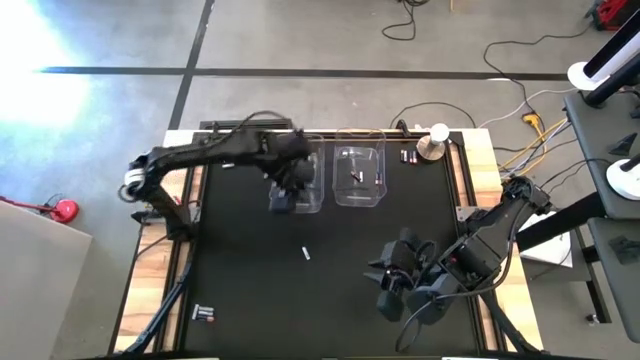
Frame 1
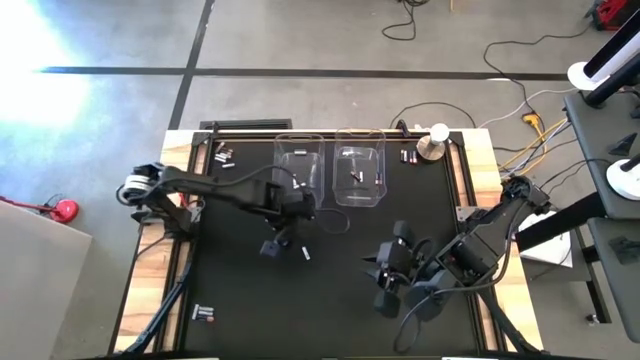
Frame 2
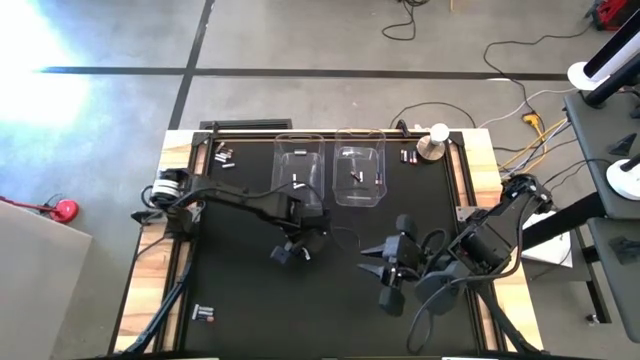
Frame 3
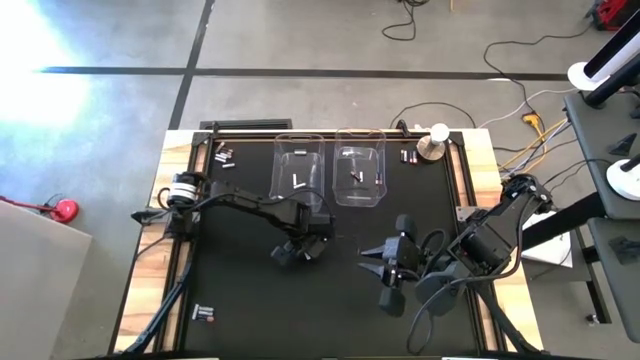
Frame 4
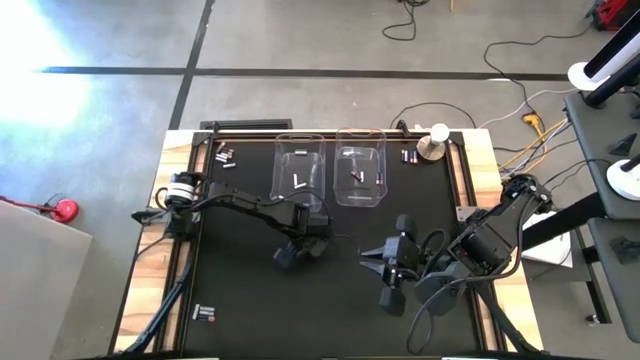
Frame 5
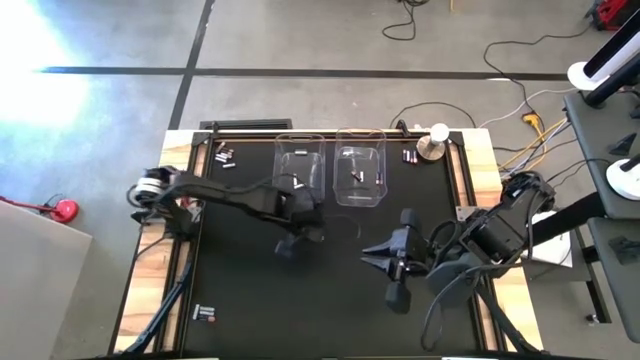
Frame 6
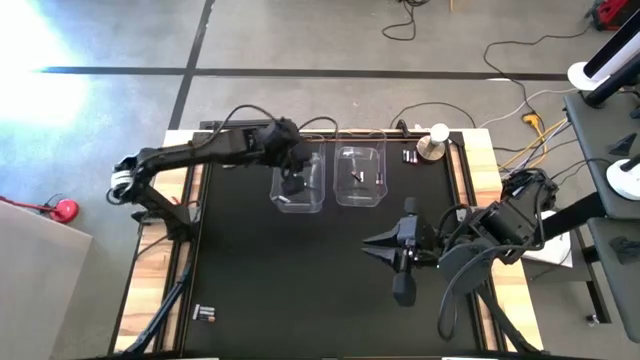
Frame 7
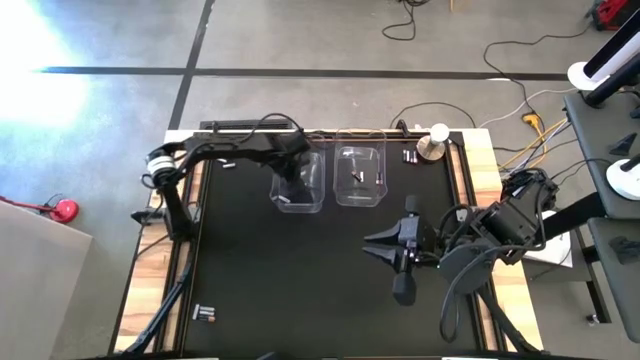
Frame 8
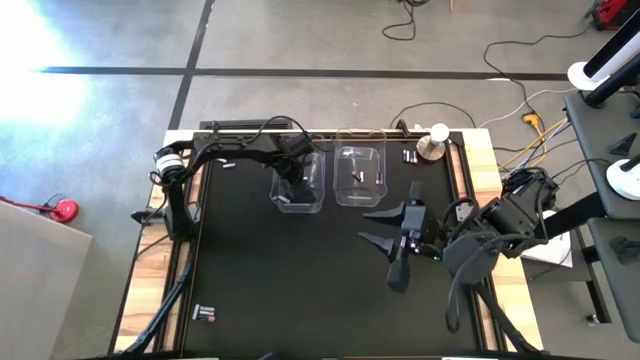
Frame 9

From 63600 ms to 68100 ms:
Task: Sort batteries
Put the white battery into the left transparent bin

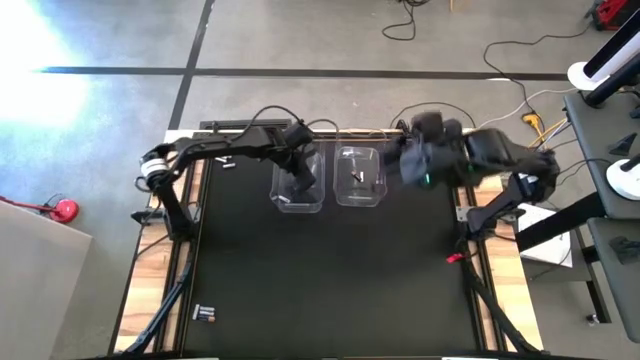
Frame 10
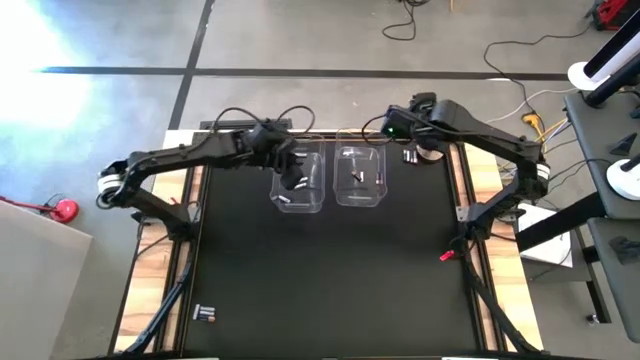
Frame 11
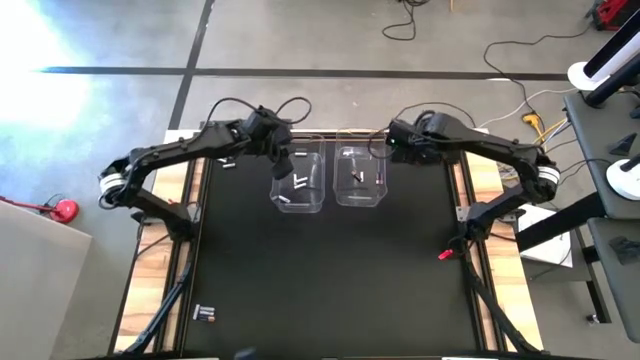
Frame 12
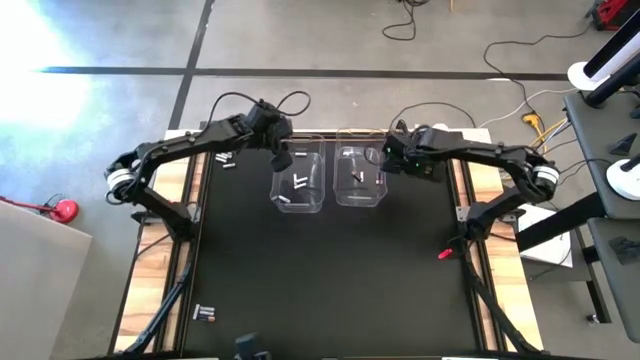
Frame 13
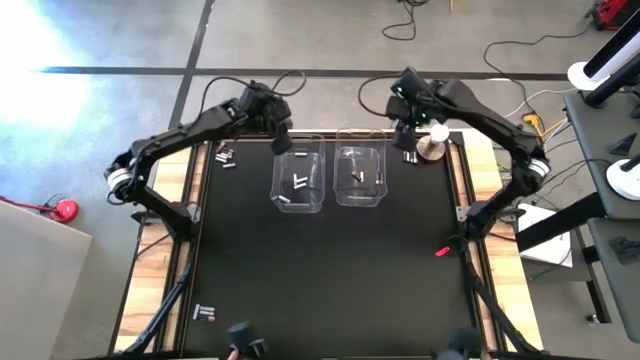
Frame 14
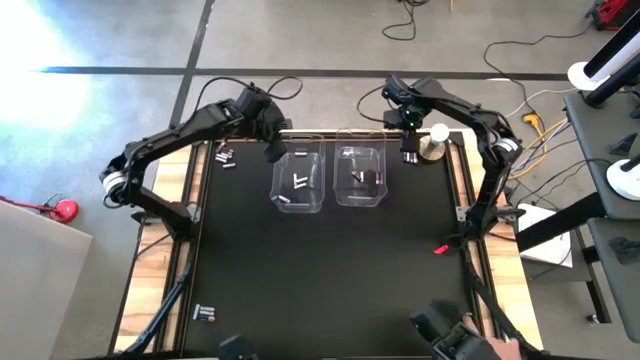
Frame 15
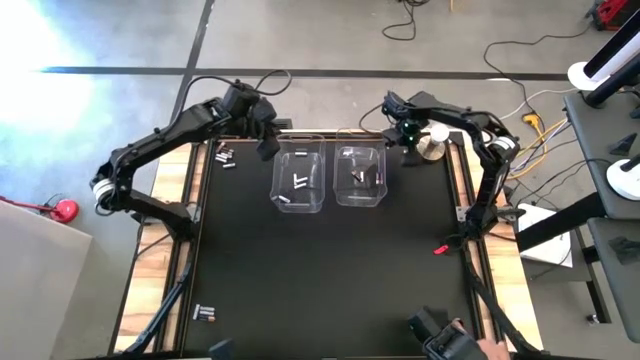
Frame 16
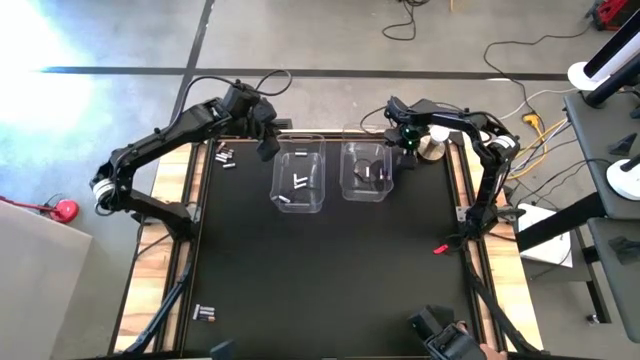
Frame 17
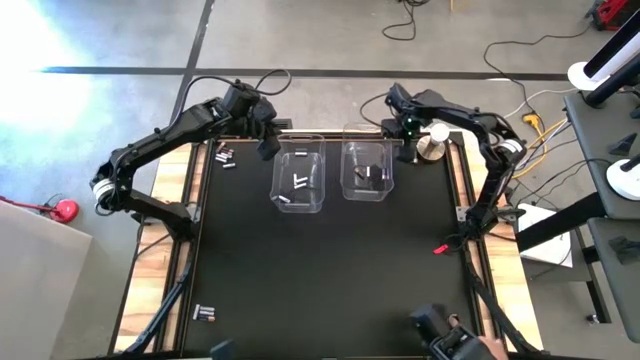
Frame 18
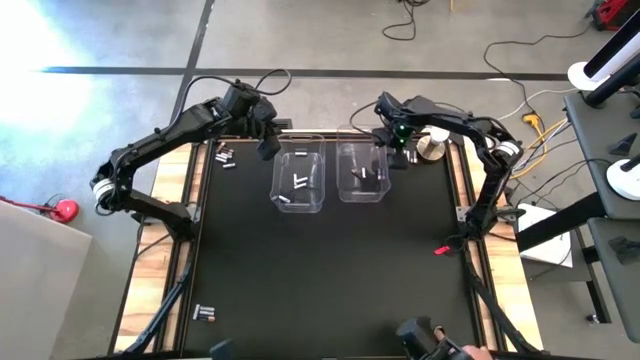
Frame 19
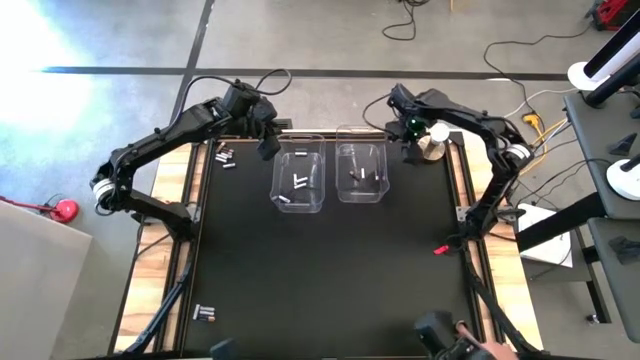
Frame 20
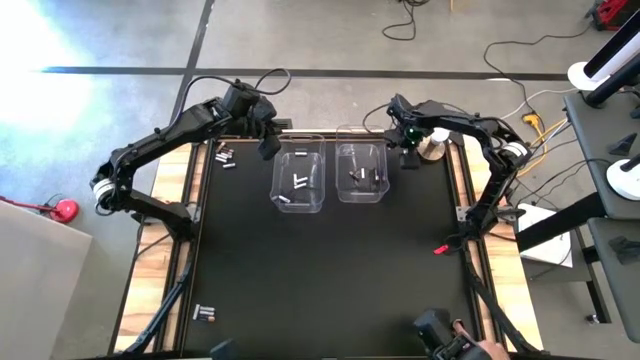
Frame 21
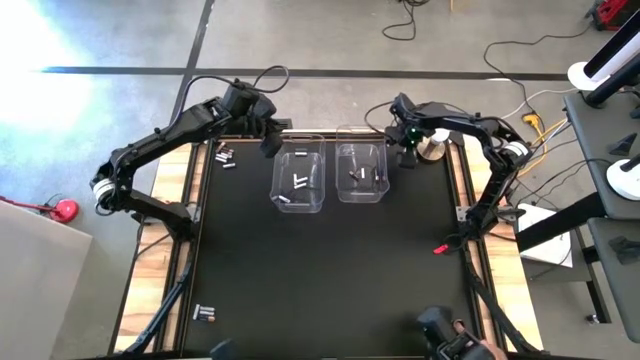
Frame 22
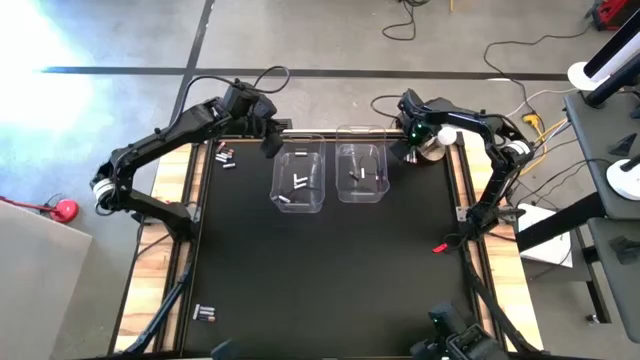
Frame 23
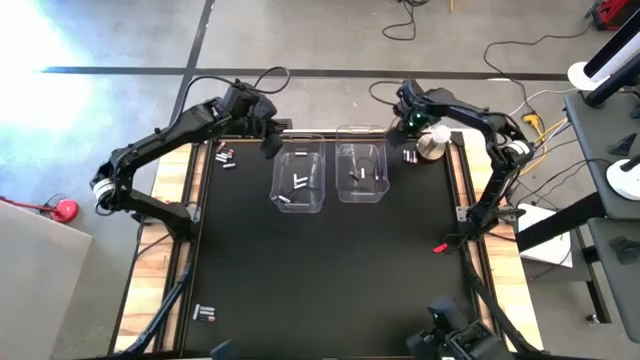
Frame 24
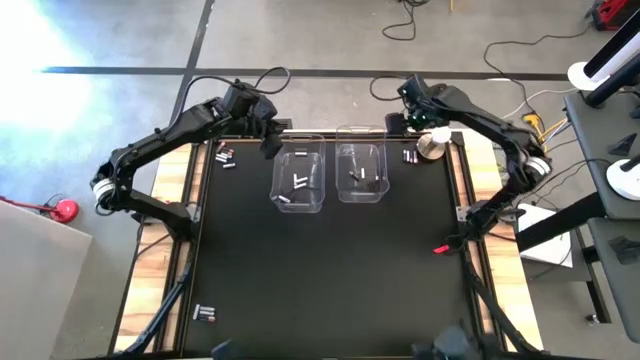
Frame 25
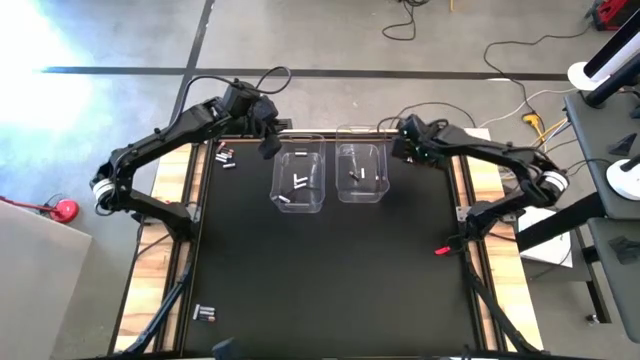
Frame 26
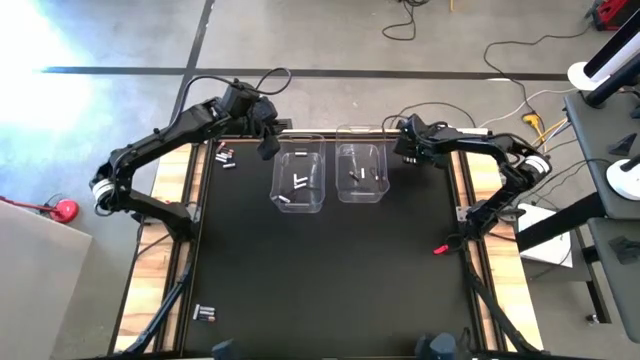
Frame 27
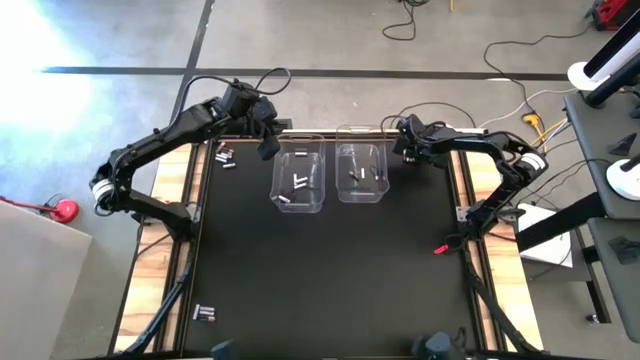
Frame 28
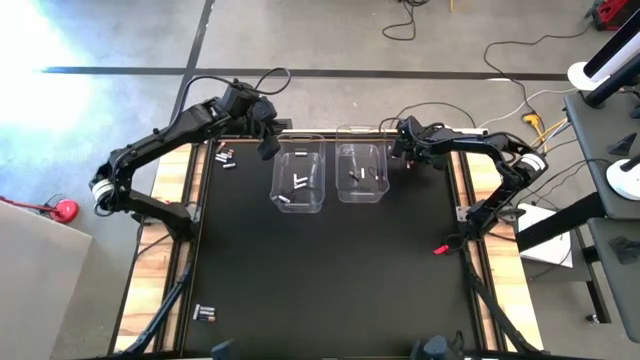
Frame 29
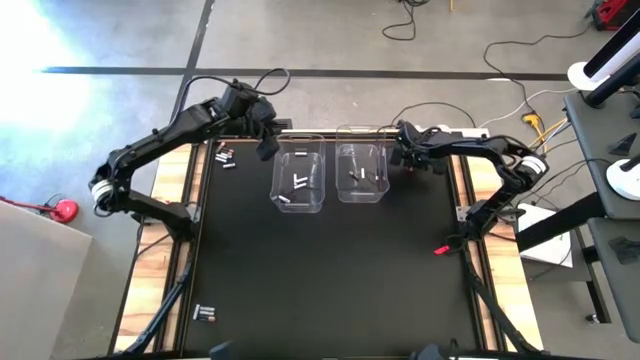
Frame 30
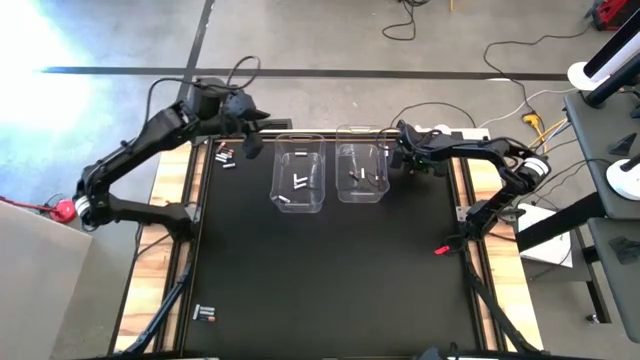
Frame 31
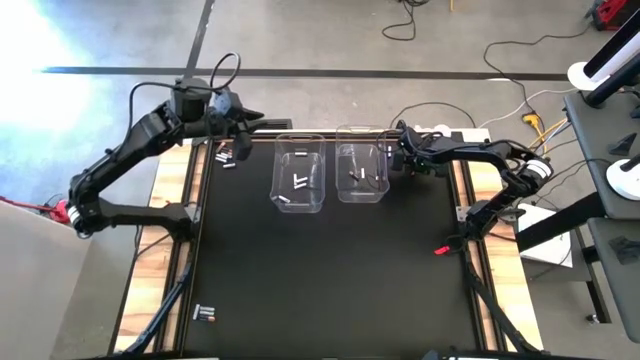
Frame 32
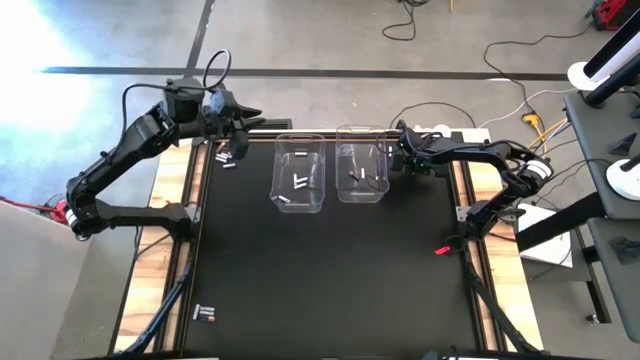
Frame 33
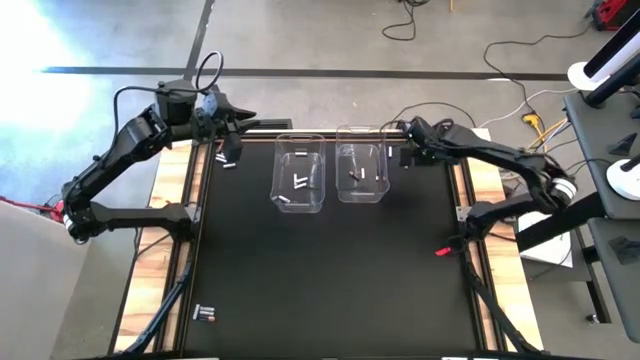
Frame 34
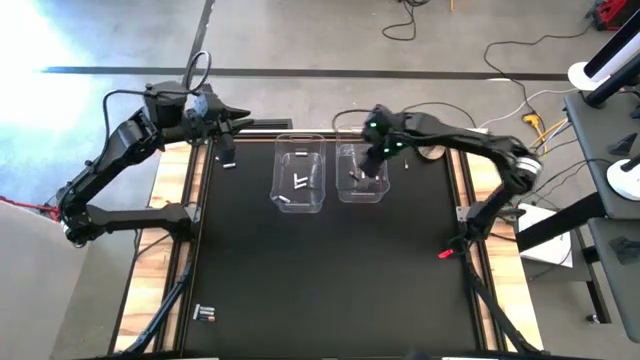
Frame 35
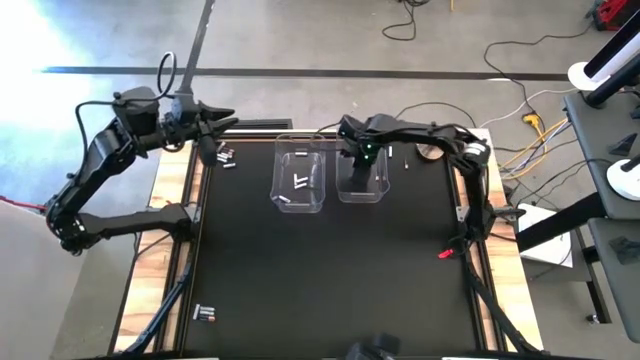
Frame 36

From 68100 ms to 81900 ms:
Put the black battery into the right transparent bin

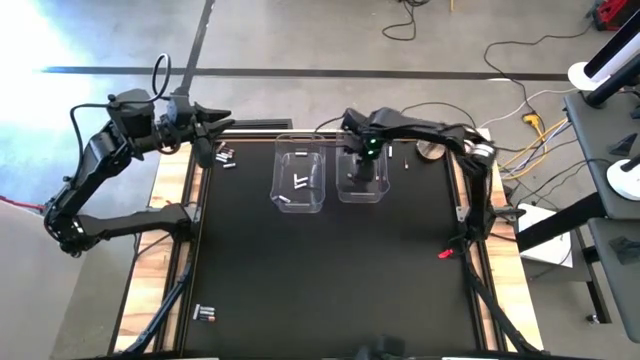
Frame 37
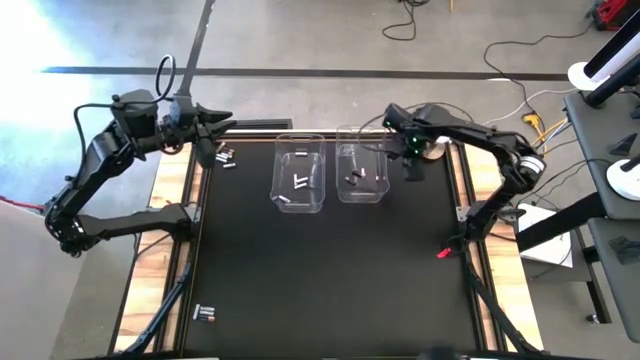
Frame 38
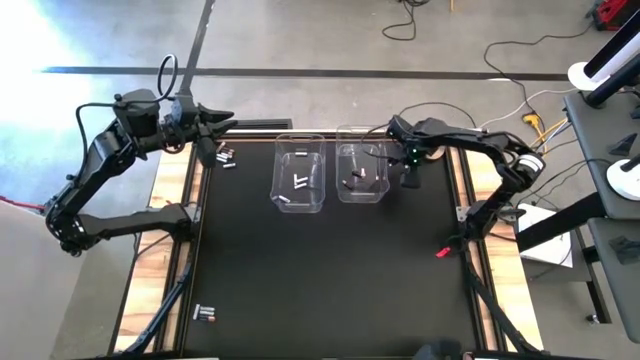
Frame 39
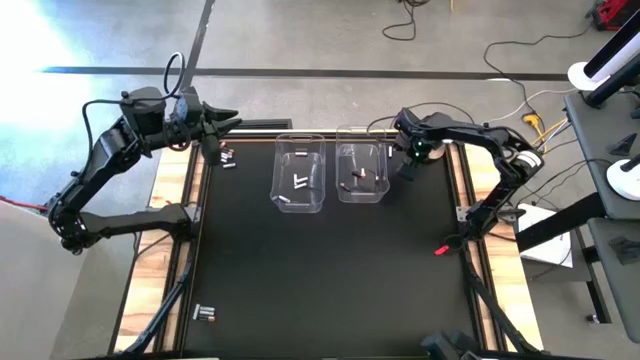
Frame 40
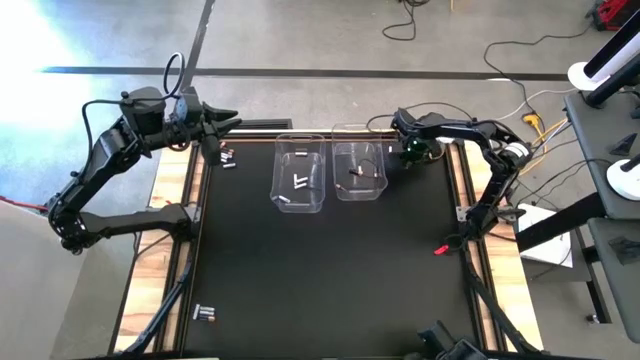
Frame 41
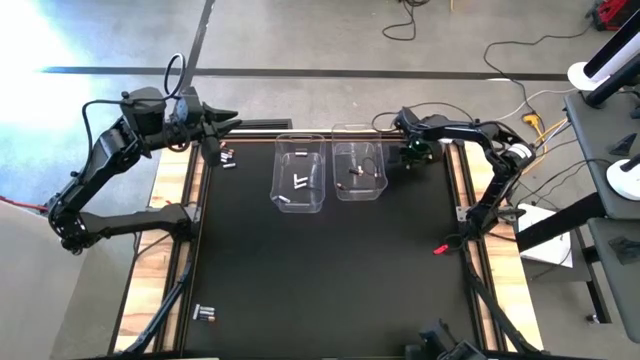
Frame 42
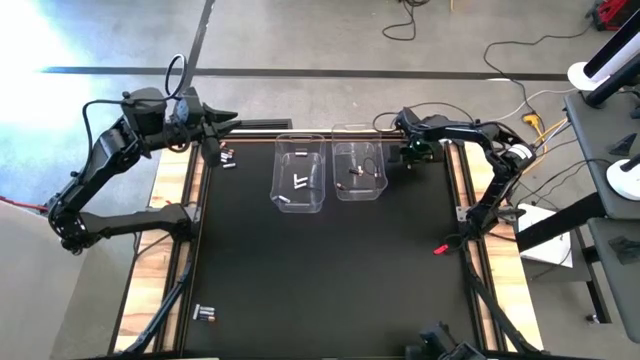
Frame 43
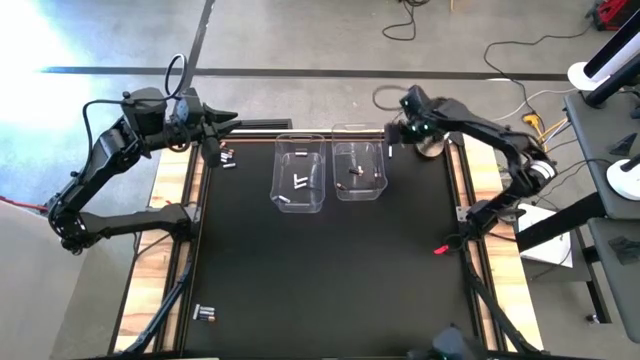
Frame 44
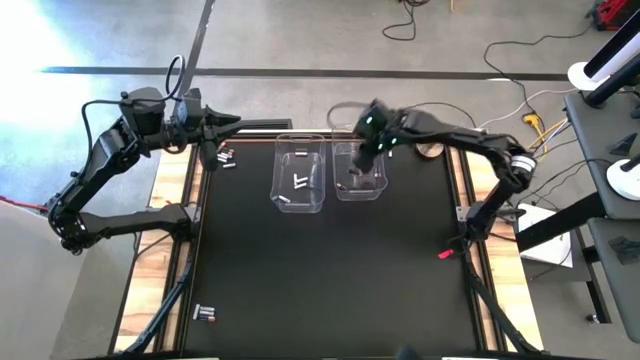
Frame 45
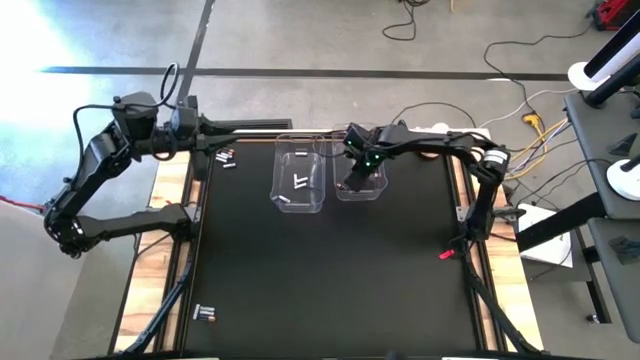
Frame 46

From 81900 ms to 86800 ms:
Put the black battery into the right transparent bin
